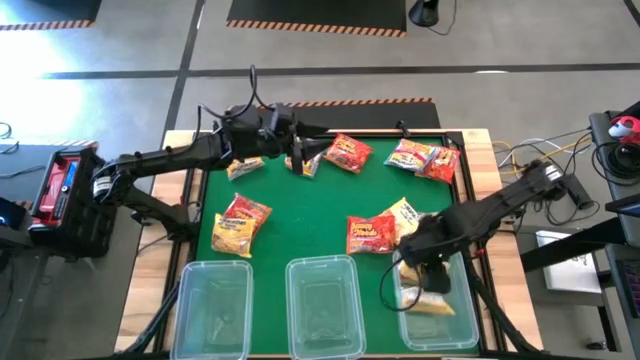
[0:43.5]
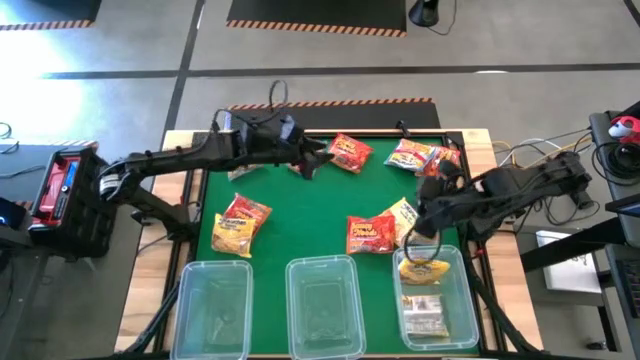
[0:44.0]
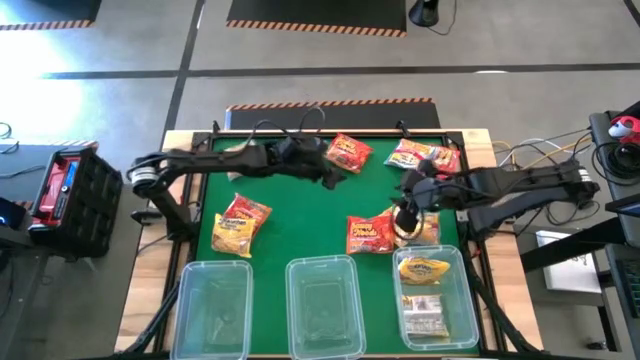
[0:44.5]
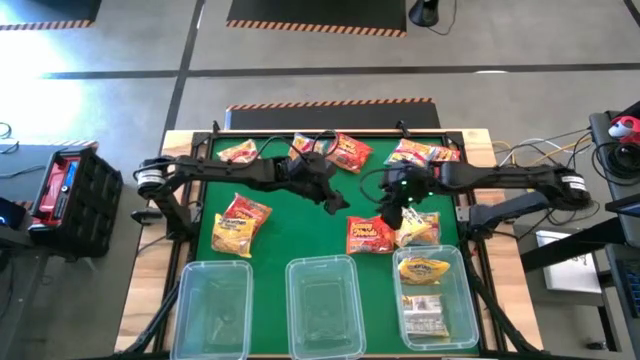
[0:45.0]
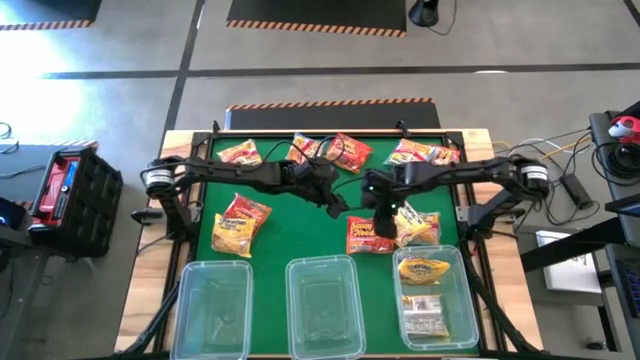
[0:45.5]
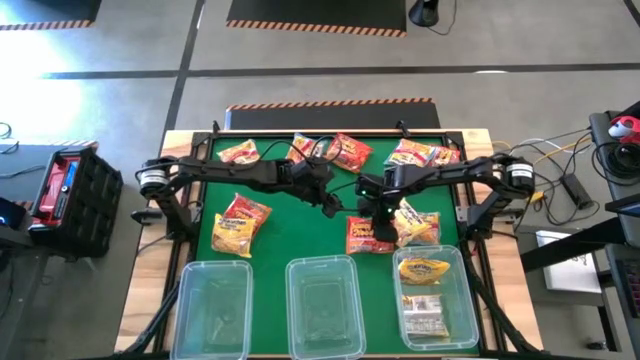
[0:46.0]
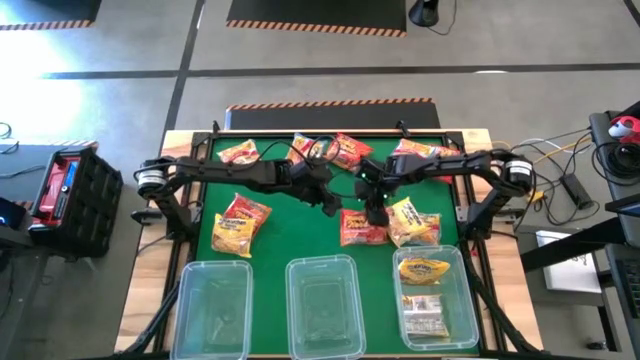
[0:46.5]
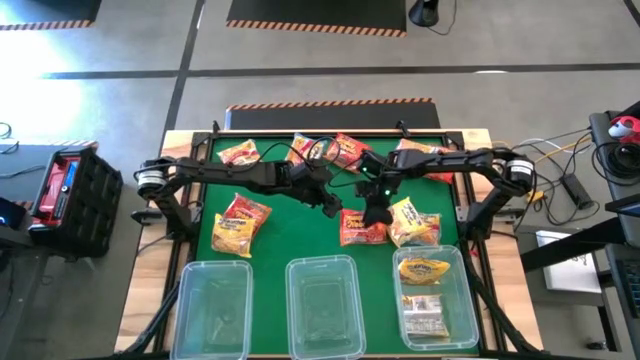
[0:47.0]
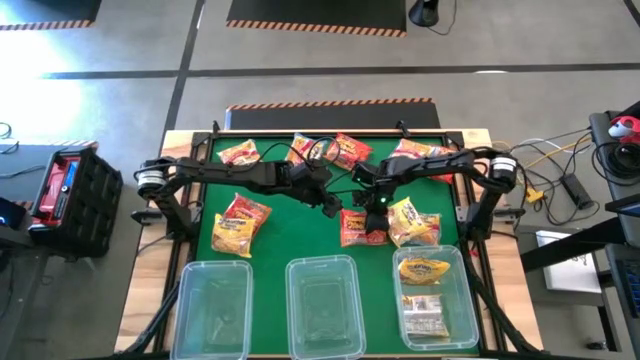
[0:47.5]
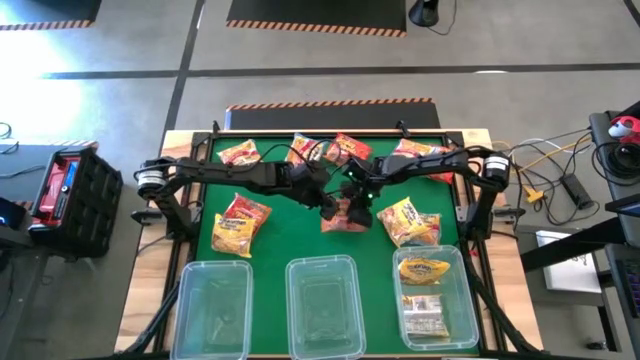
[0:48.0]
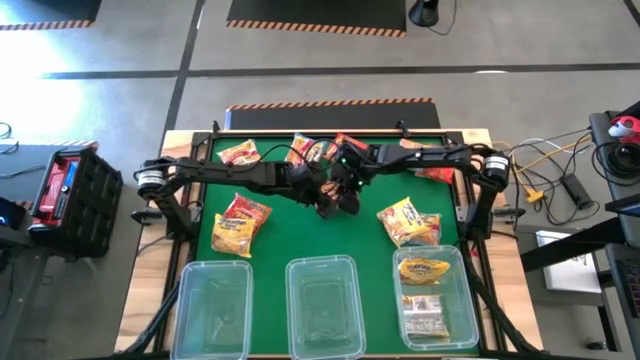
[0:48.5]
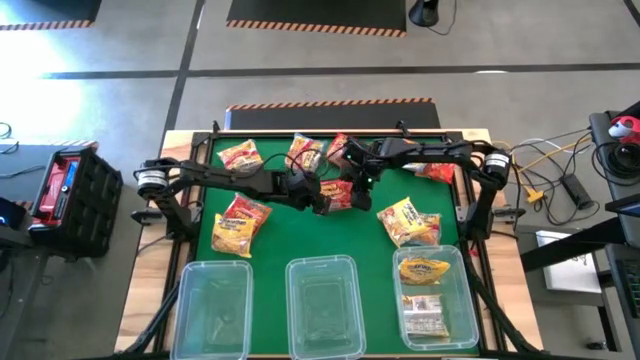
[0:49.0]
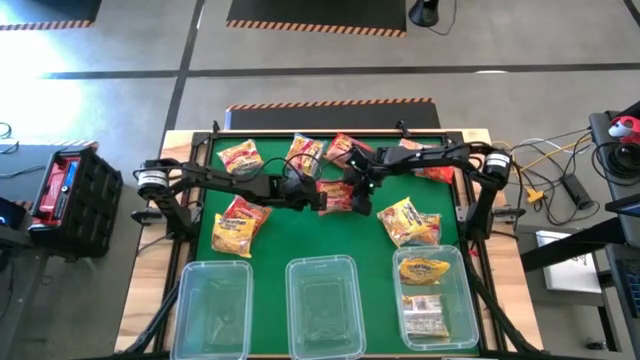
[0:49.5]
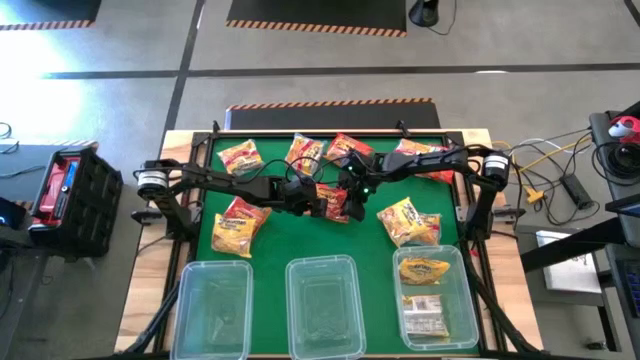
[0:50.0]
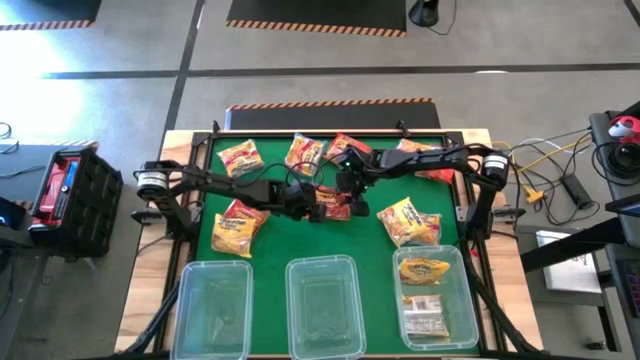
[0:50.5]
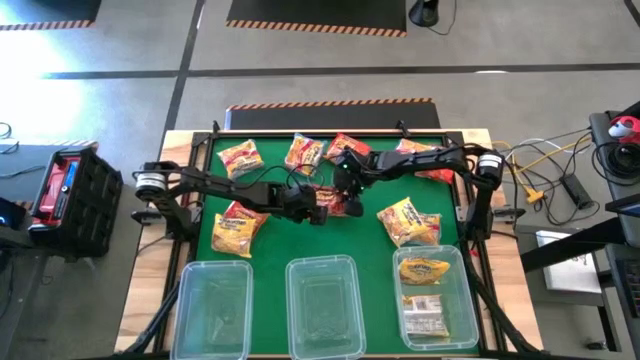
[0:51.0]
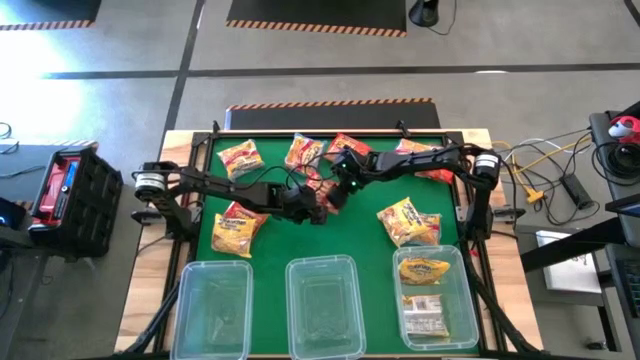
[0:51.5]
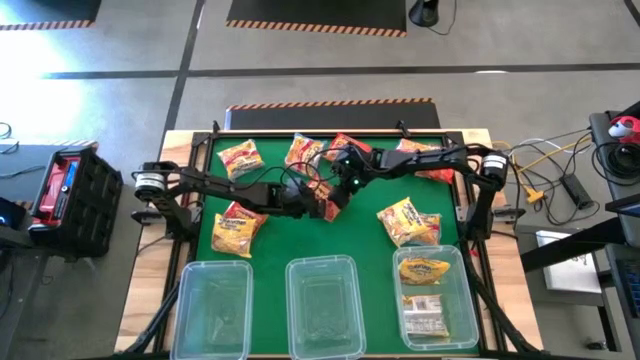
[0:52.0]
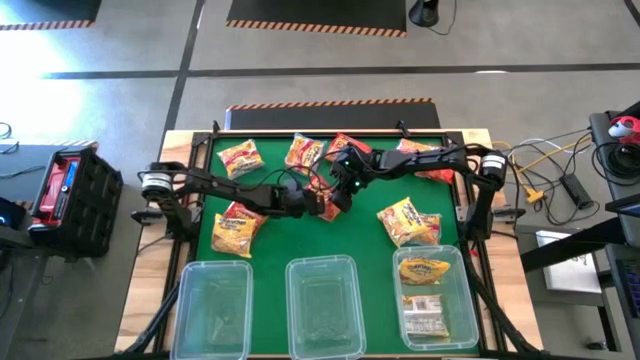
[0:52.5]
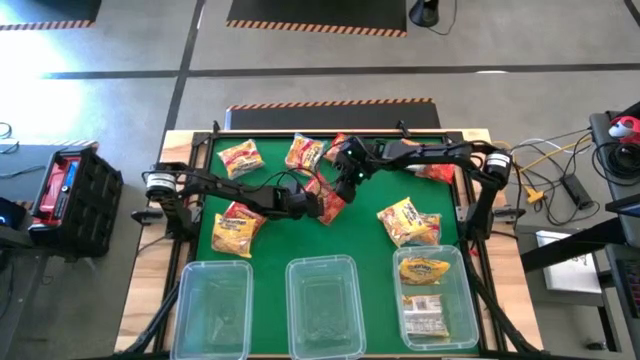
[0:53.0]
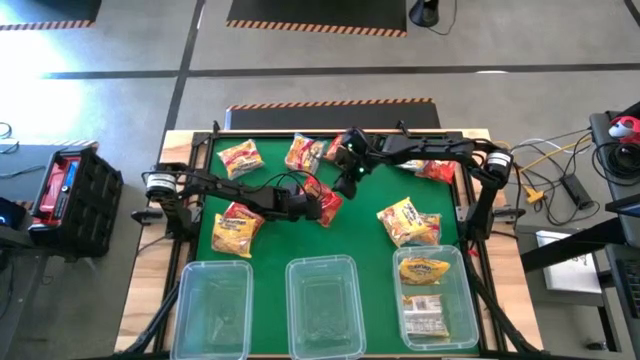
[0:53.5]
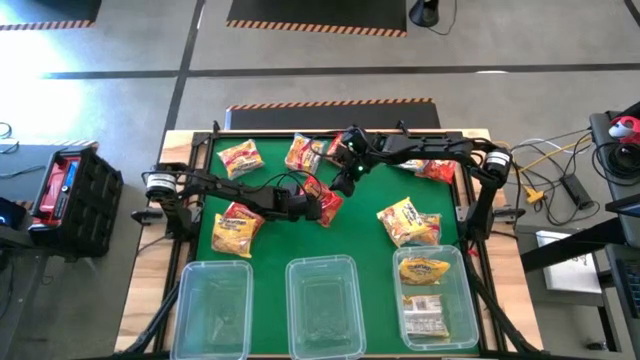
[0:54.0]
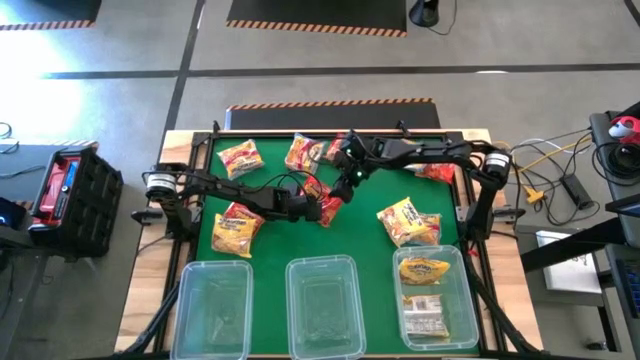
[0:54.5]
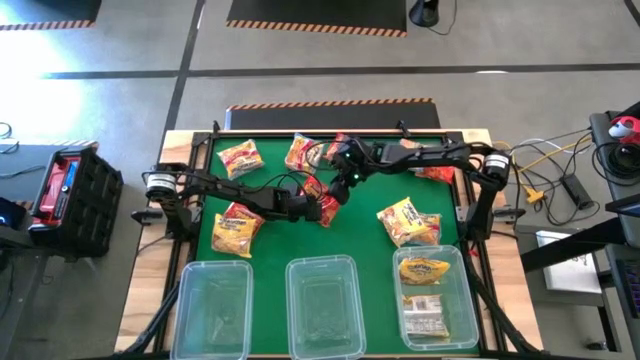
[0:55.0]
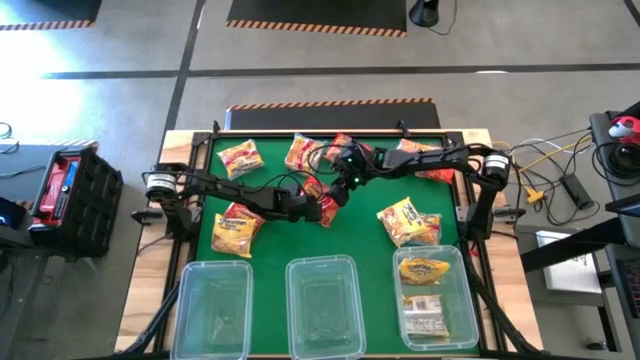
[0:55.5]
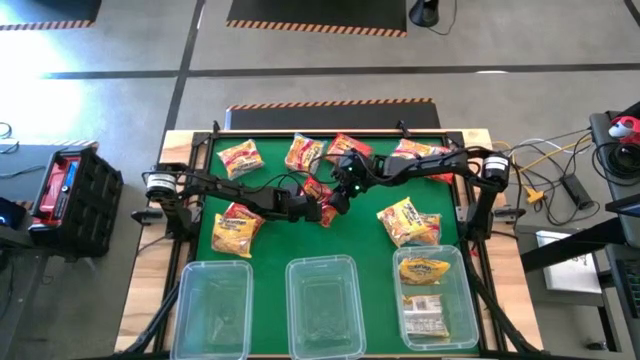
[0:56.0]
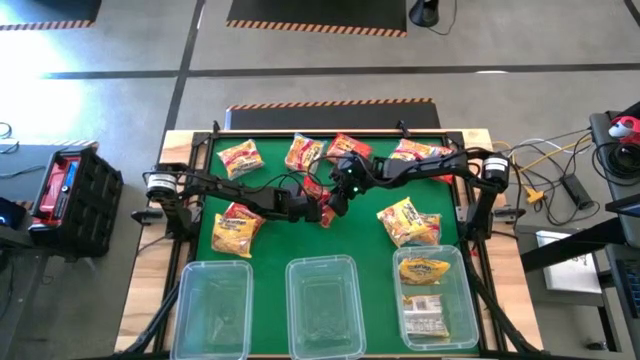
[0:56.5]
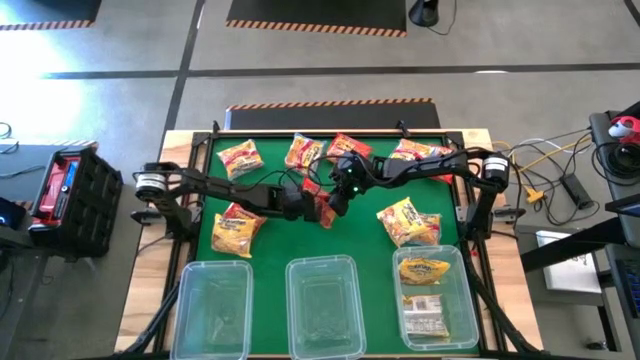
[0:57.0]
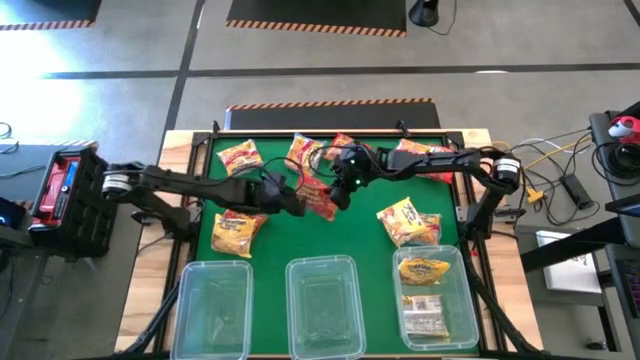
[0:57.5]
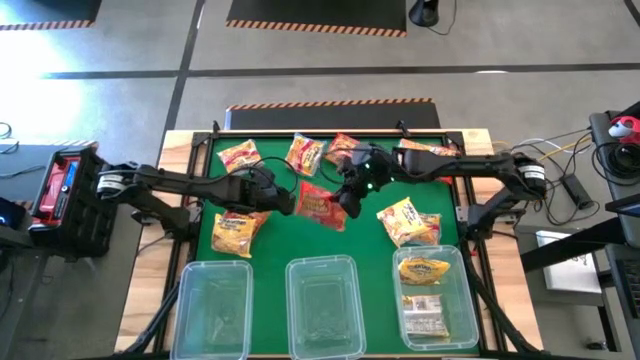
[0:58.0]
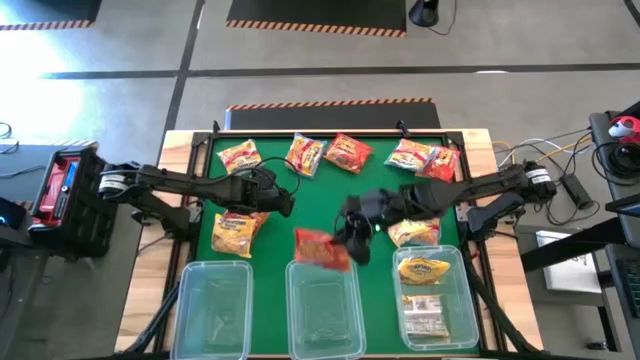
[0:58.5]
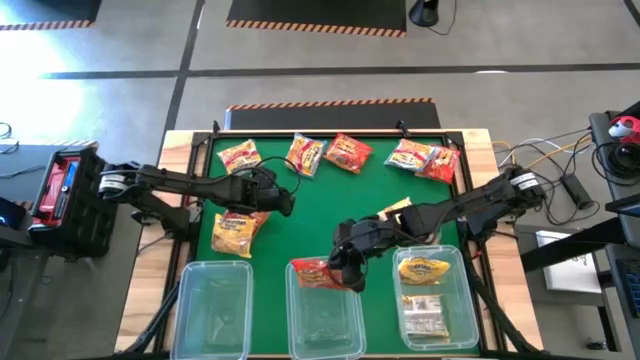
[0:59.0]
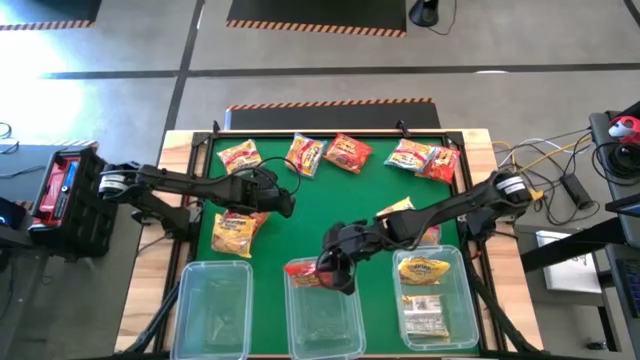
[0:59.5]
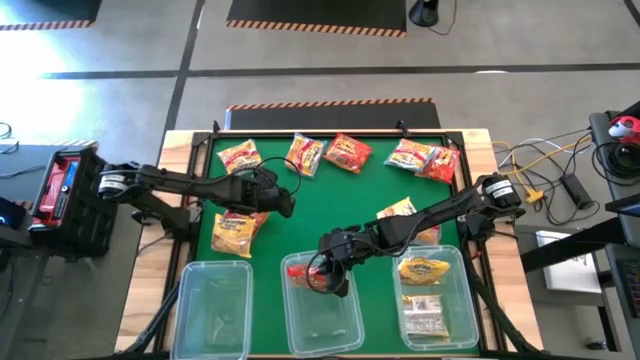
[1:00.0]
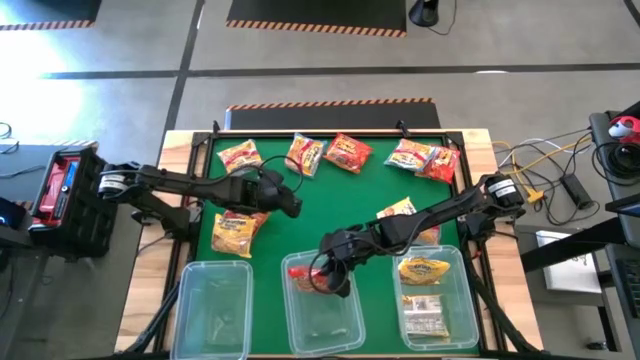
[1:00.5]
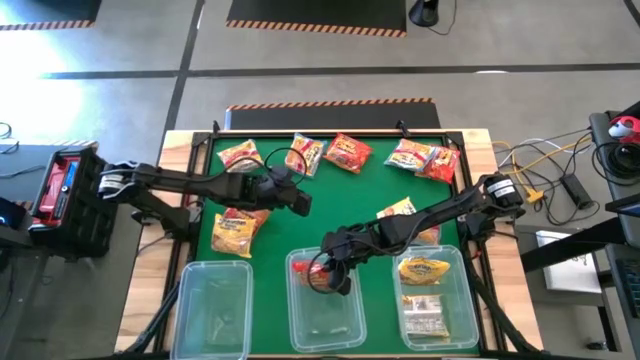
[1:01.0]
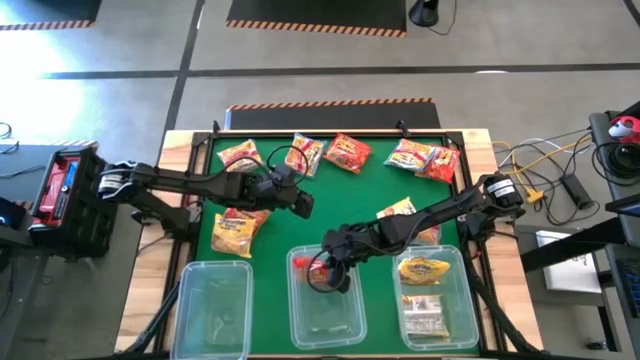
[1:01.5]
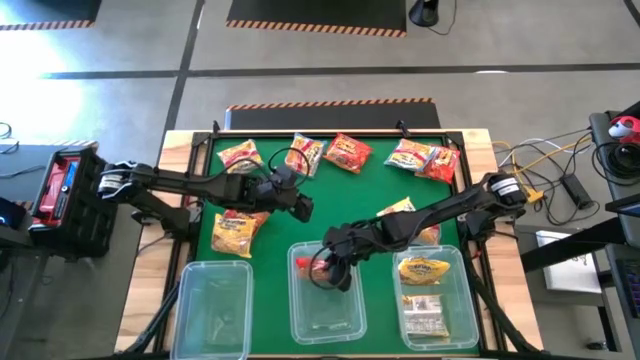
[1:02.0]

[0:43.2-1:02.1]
Task: Sort Maruchan noodles
Put the orange noodle pack into the middle transparent bin

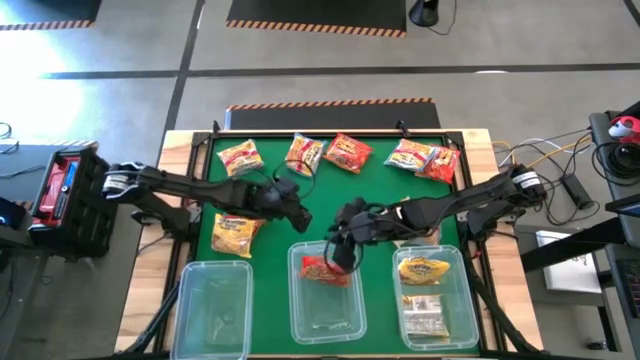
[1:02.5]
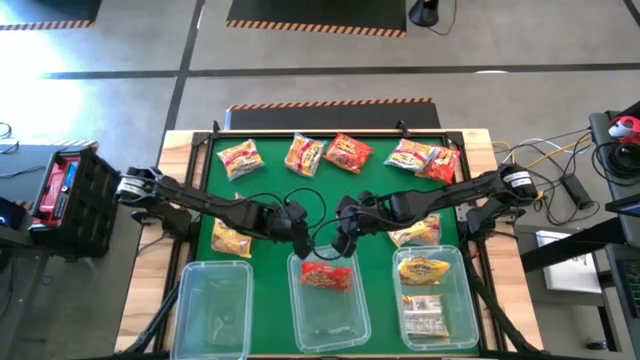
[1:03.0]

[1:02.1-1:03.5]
Adjust the middle transparent bin
